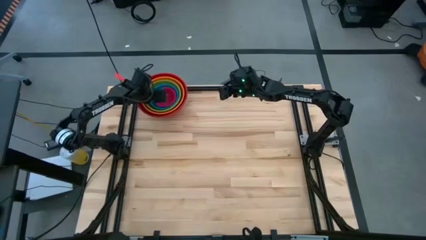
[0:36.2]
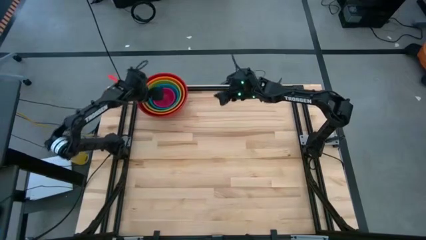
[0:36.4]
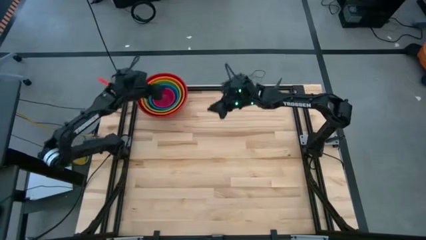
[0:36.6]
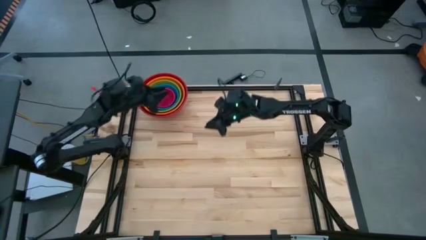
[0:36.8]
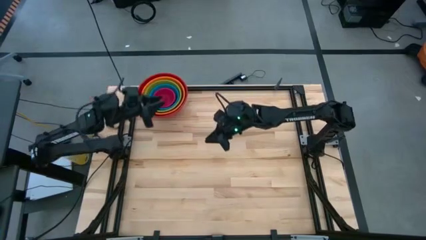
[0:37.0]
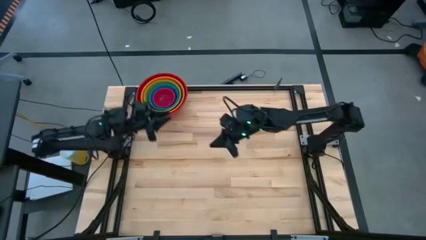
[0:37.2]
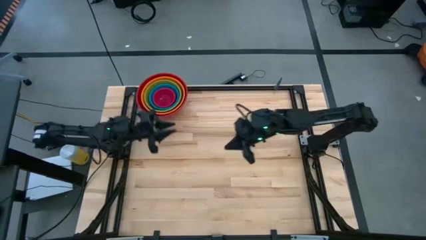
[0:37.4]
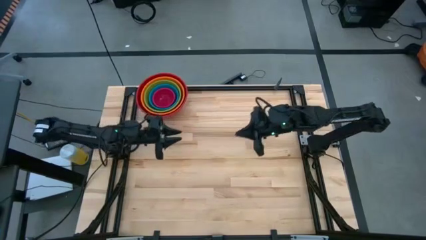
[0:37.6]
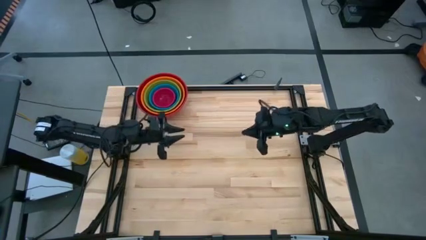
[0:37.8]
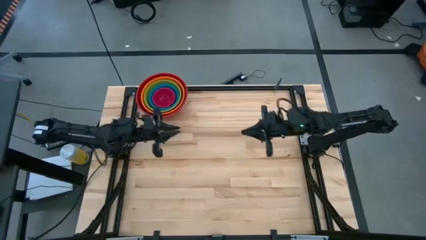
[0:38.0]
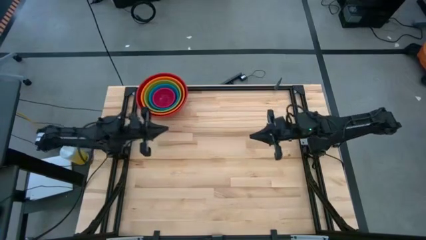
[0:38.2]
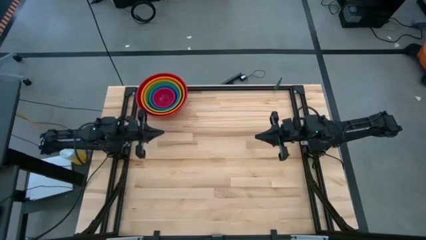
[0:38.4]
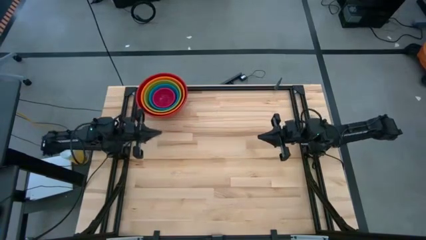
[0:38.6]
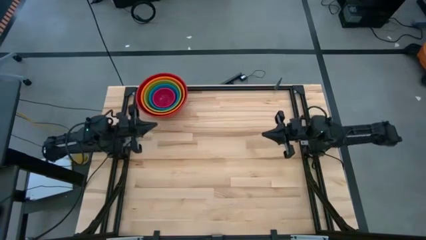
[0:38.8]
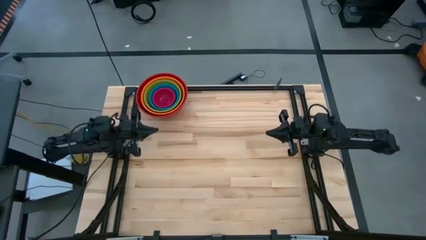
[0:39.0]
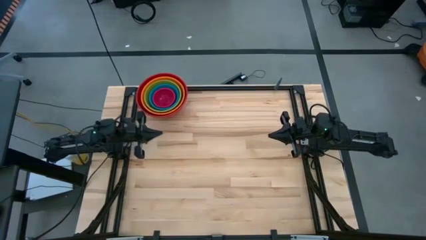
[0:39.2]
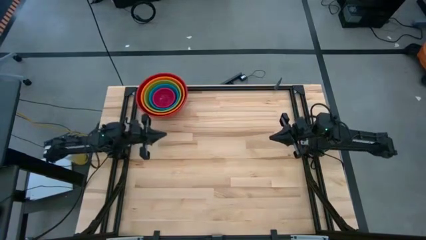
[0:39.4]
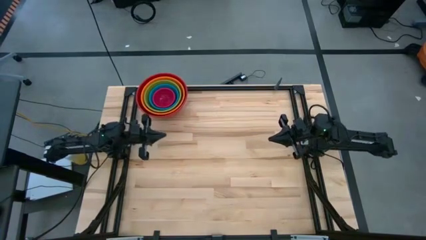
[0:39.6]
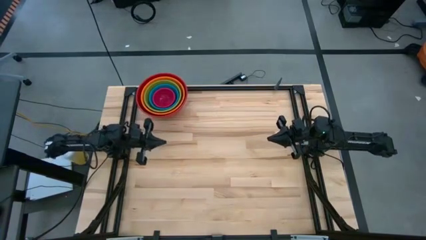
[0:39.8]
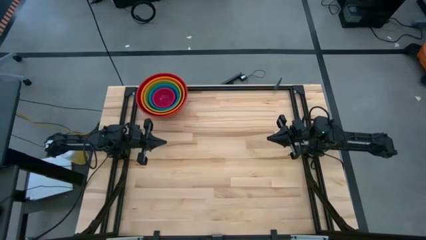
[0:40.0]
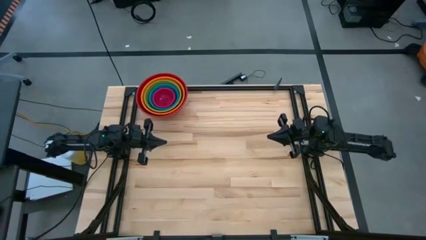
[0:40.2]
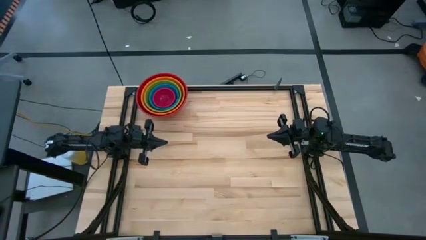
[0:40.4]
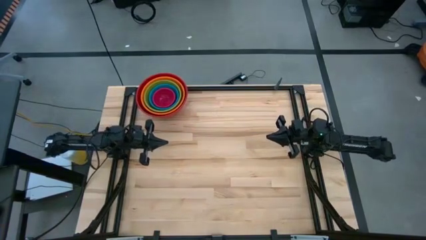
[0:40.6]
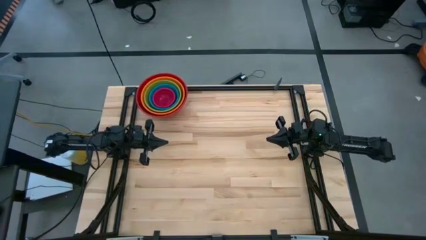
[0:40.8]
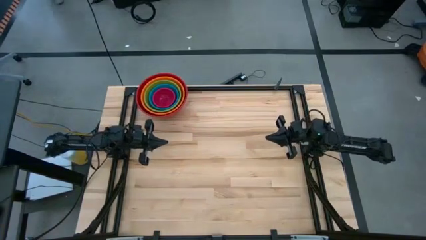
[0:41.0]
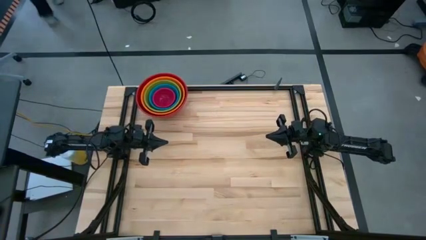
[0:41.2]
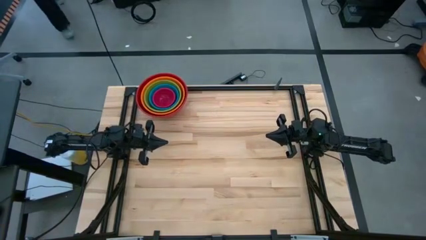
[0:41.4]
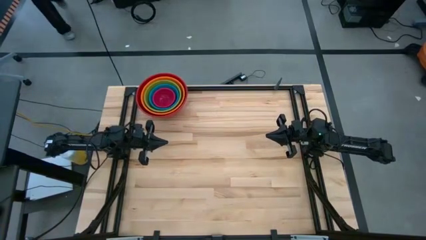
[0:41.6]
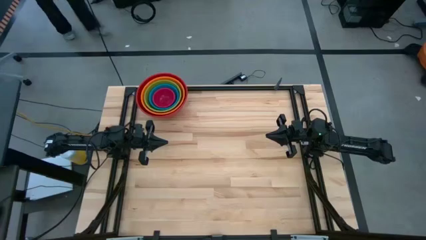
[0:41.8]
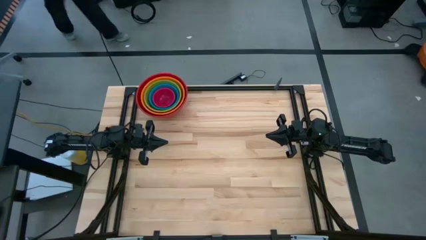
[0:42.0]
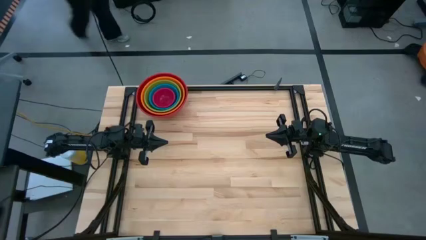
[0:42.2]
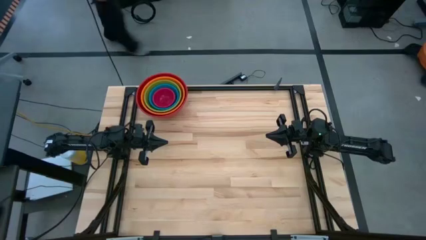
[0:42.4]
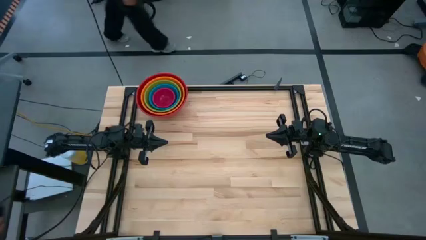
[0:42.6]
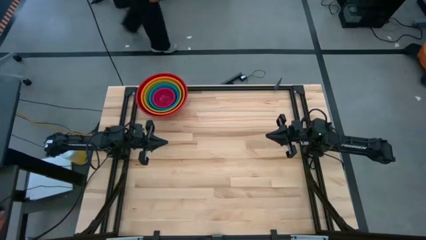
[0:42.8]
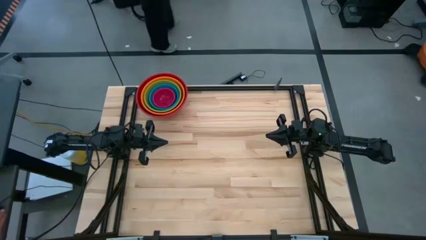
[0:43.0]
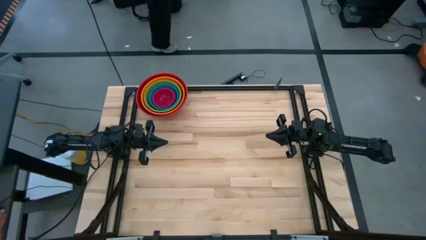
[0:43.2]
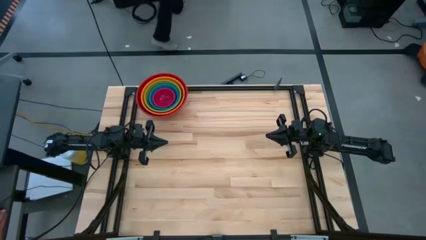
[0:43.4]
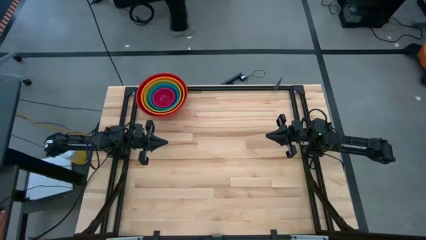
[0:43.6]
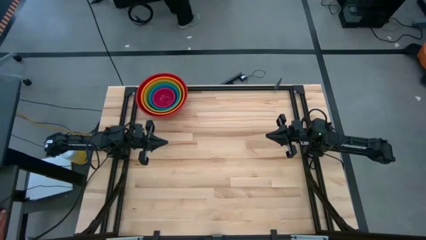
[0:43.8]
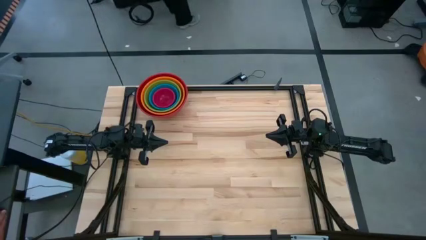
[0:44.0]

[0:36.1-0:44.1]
Return to Home Position

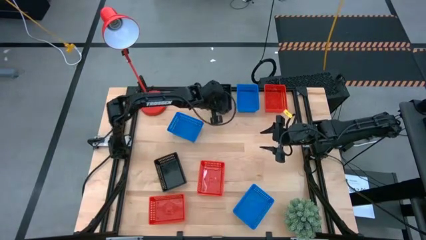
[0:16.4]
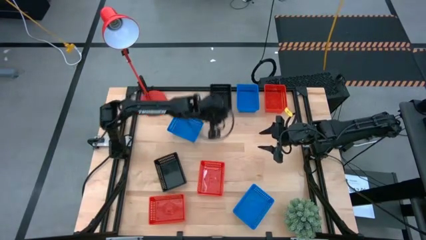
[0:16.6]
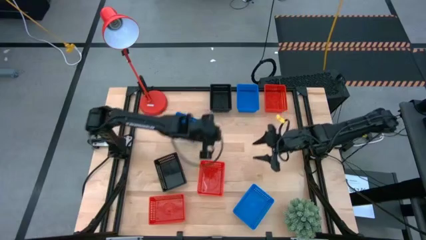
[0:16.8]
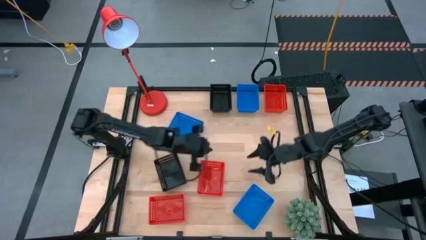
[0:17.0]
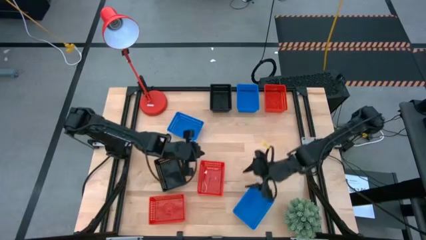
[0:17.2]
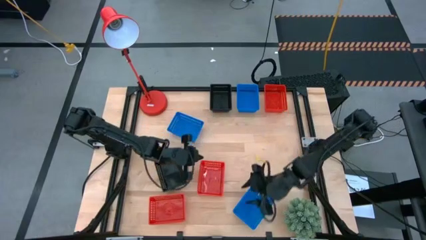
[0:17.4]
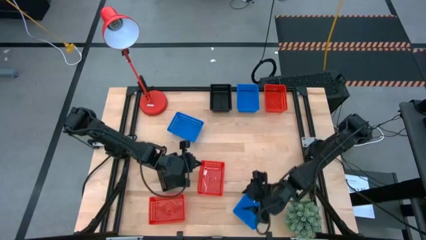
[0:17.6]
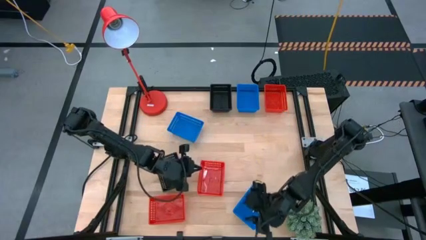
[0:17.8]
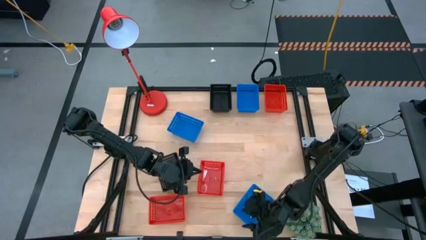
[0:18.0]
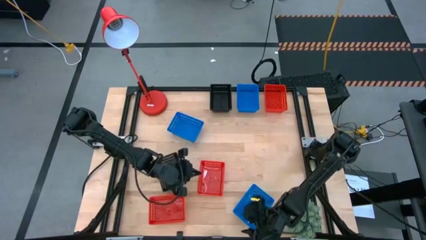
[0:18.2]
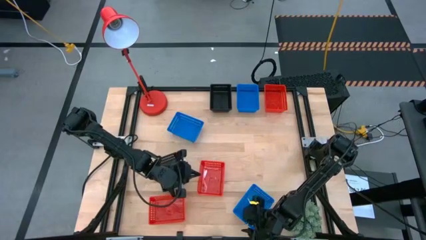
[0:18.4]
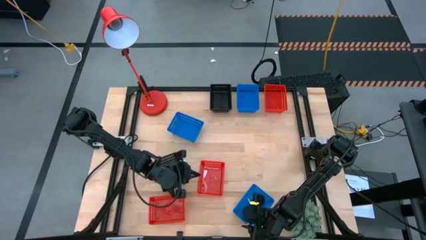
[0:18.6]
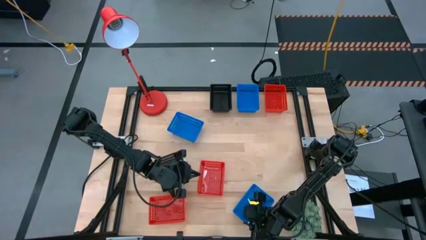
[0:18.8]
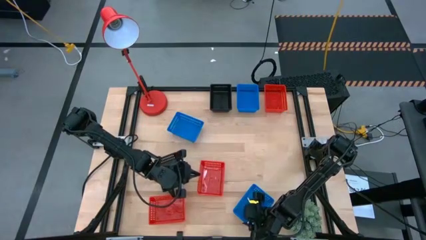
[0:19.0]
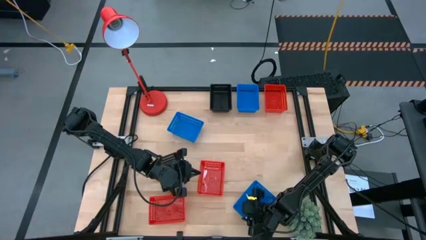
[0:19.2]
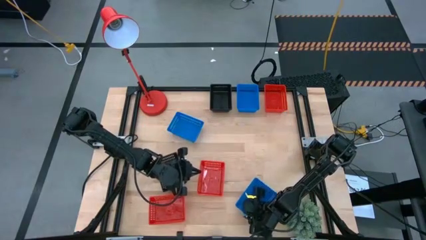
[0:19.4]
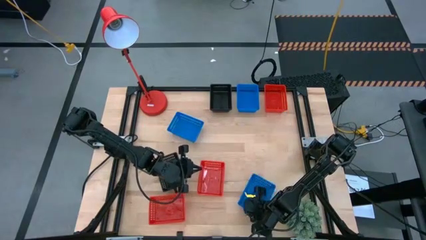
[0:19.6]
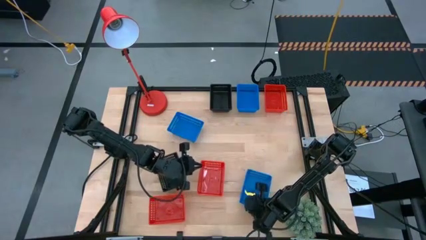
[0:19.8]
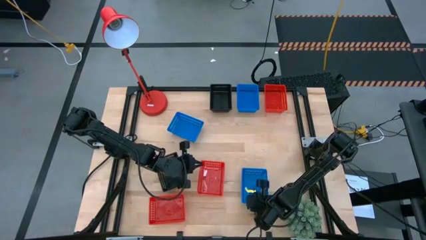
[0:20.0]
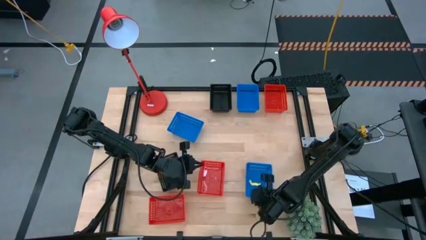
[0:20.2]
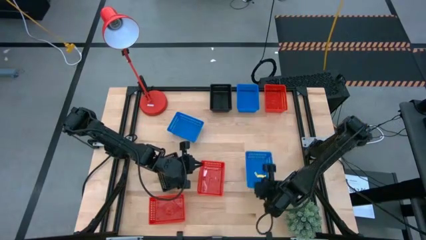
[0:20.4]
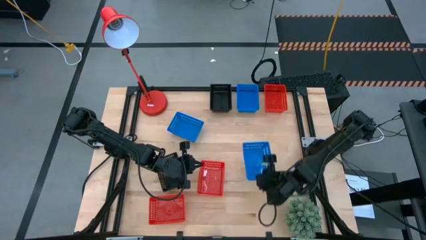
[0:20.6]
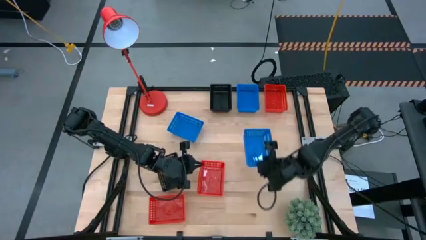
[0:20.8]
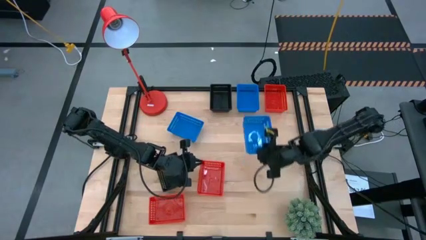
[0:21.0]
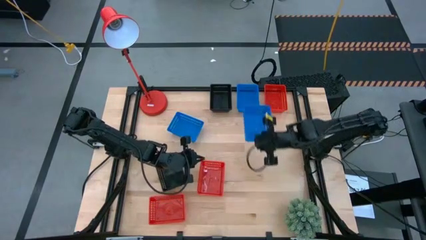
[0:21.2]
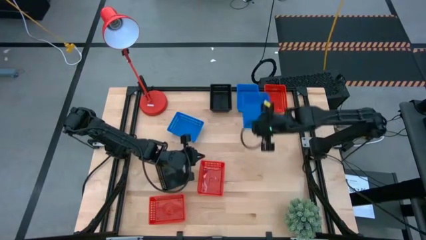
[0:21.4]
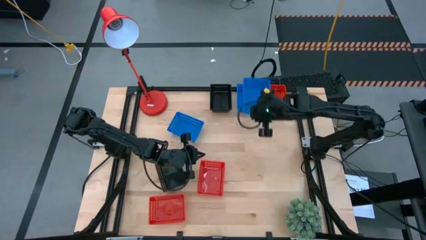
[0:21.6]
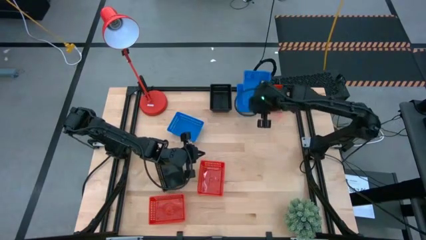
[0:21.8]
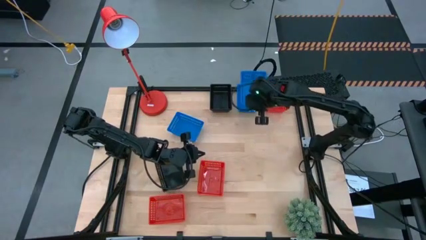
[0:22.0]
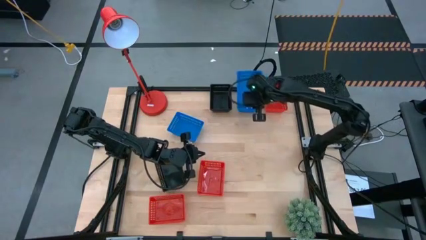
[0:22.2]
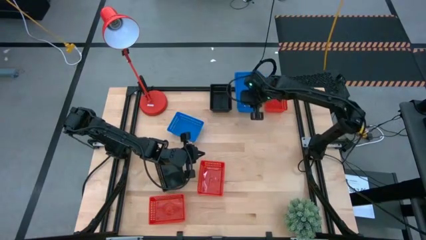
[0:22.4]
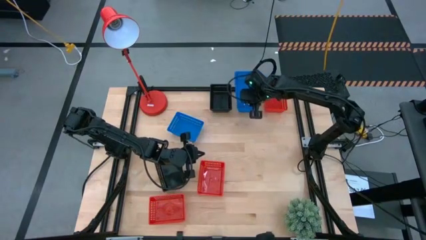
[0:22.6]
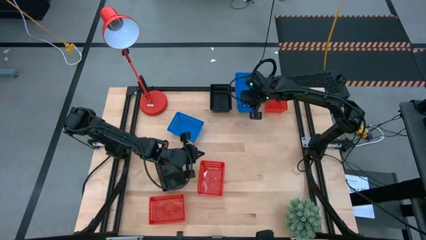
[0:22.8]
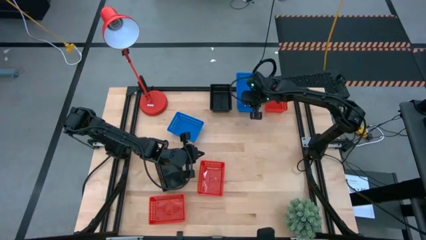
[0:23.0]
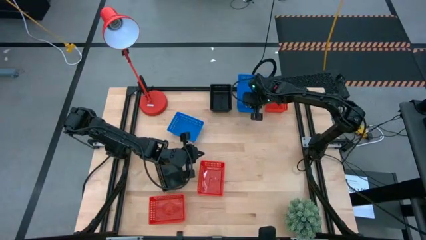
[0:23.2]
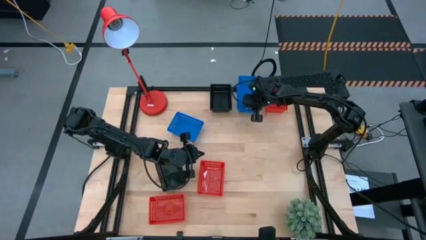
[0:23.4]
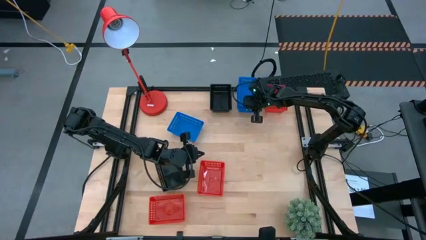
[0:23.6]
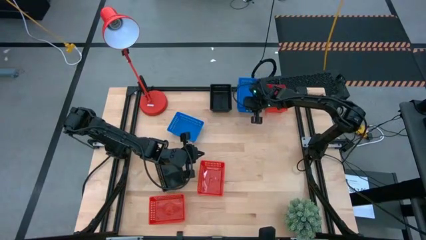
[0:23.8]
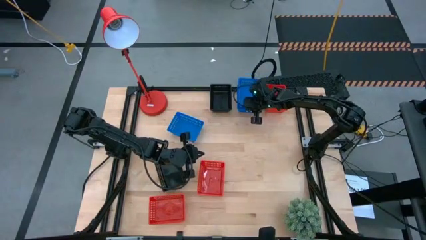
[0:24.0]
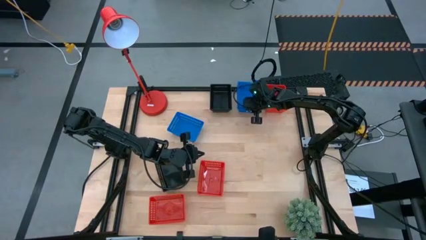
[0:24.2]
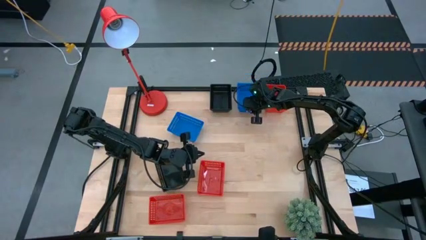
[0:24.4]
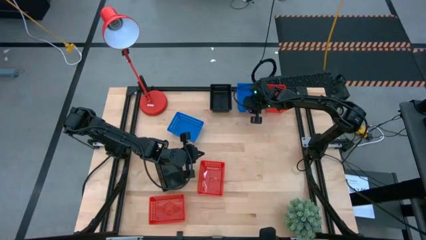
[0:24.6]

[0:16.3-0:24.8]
Stack the bottom blue basket on top of the top blue basket
